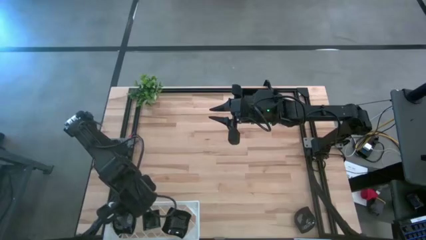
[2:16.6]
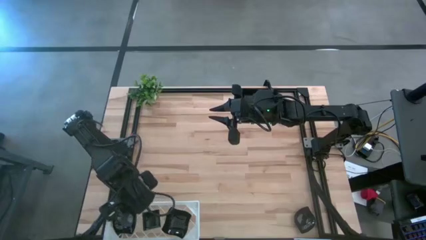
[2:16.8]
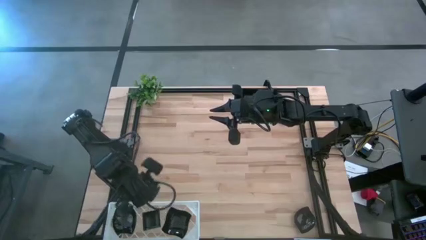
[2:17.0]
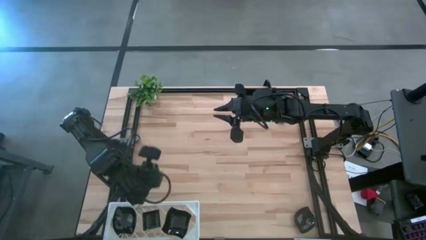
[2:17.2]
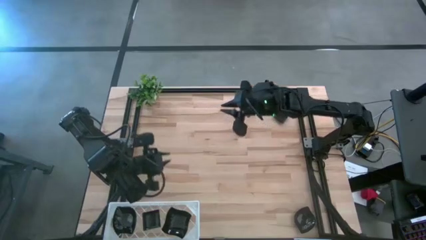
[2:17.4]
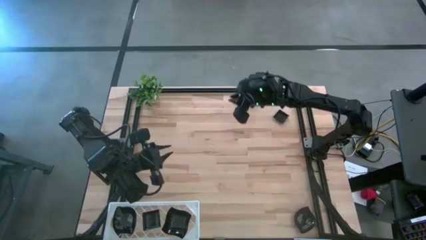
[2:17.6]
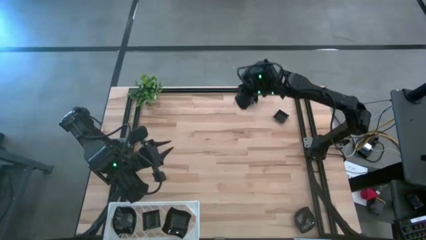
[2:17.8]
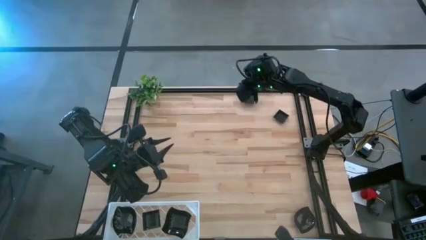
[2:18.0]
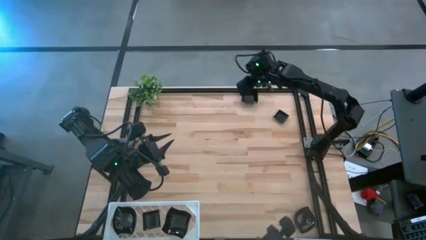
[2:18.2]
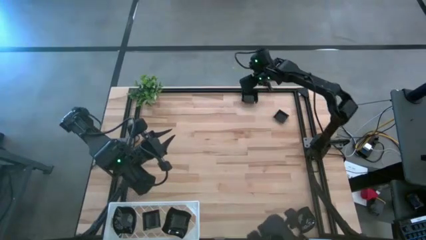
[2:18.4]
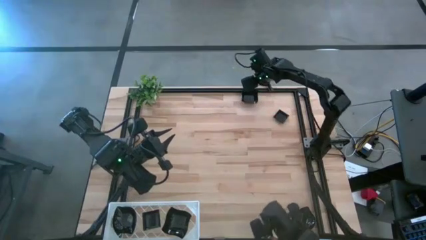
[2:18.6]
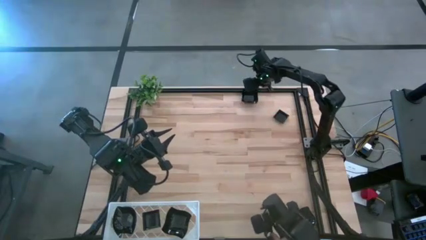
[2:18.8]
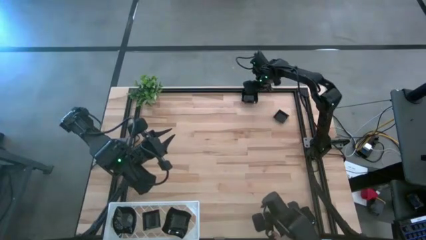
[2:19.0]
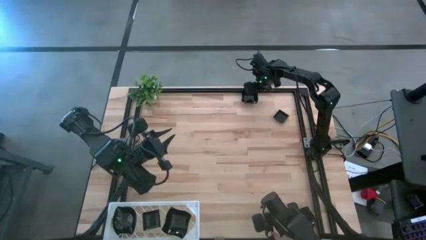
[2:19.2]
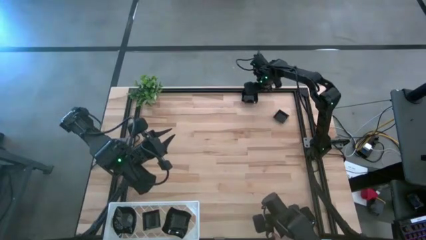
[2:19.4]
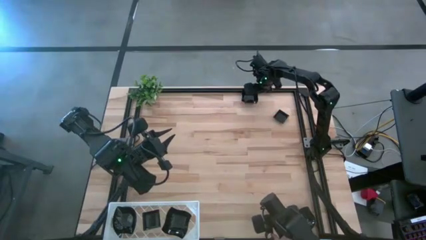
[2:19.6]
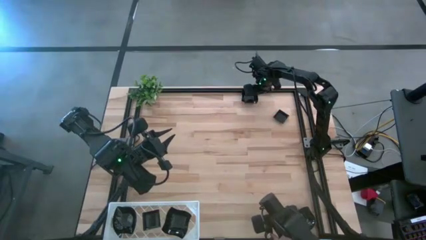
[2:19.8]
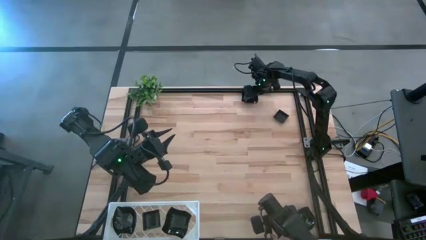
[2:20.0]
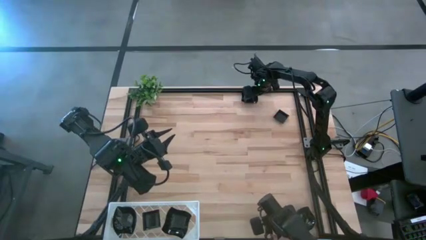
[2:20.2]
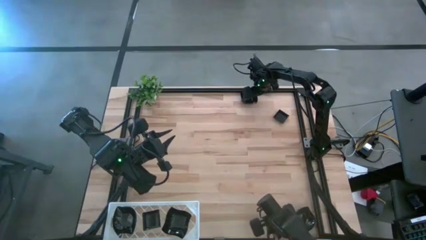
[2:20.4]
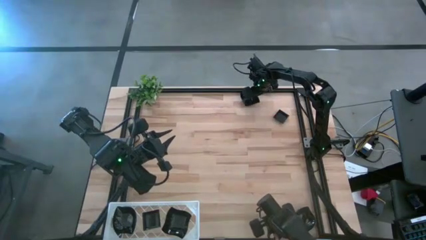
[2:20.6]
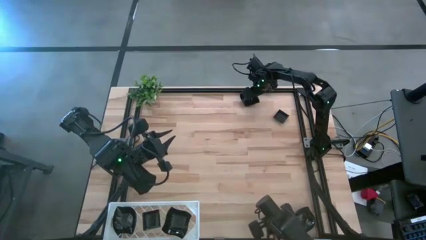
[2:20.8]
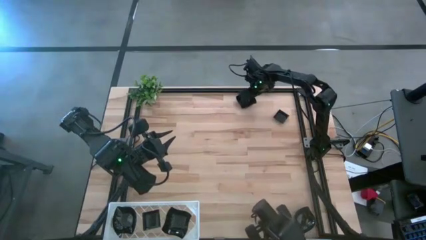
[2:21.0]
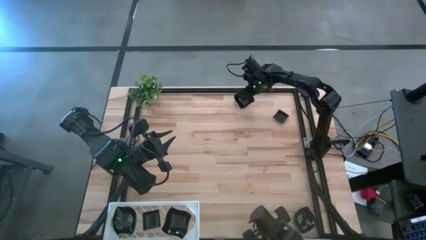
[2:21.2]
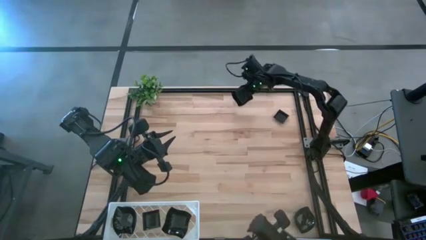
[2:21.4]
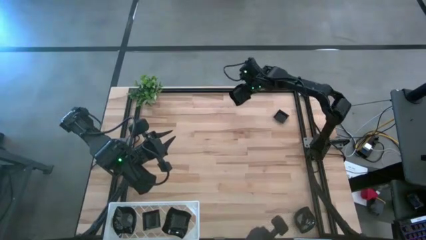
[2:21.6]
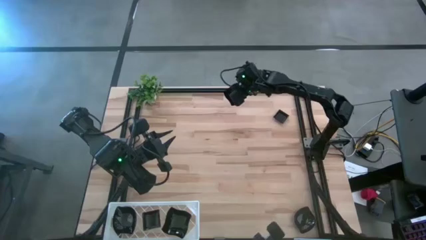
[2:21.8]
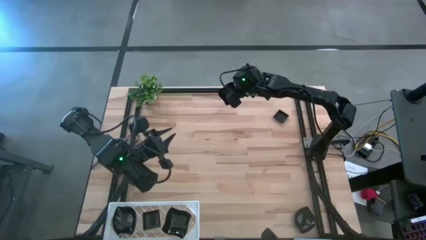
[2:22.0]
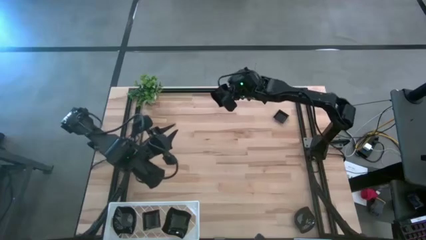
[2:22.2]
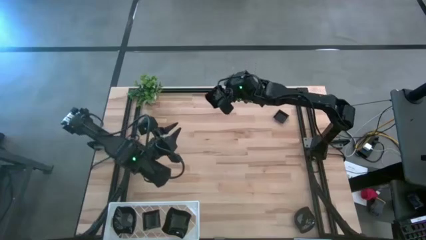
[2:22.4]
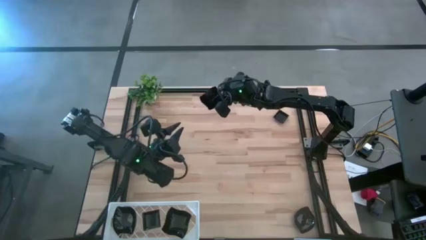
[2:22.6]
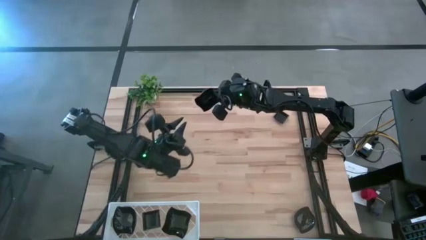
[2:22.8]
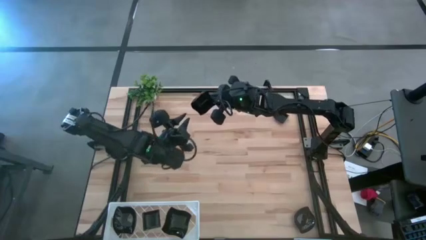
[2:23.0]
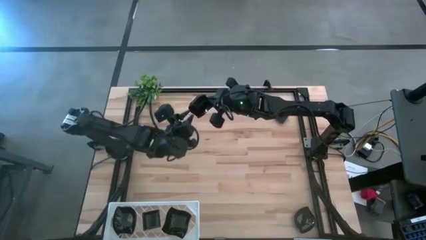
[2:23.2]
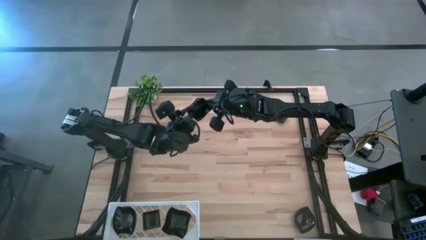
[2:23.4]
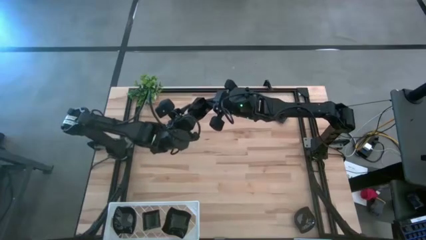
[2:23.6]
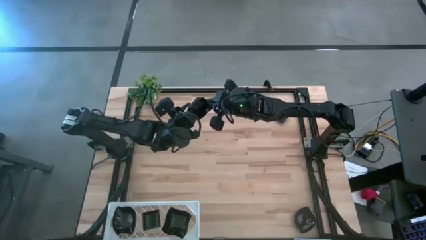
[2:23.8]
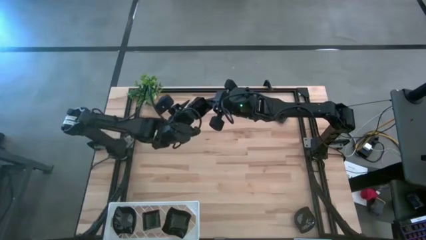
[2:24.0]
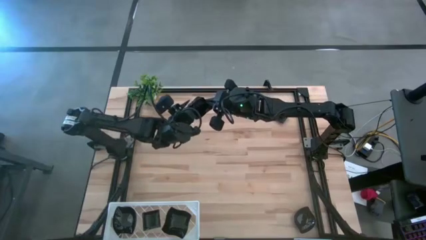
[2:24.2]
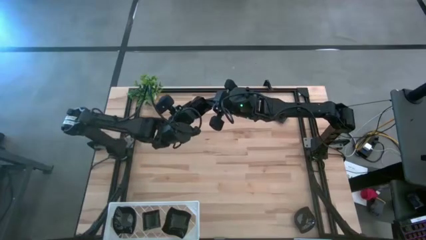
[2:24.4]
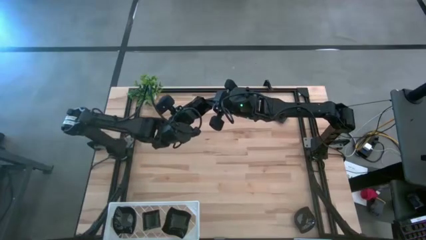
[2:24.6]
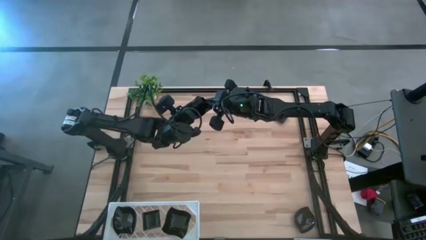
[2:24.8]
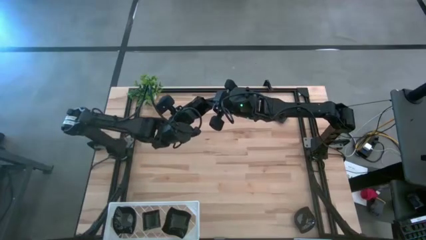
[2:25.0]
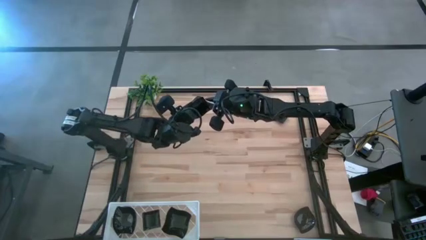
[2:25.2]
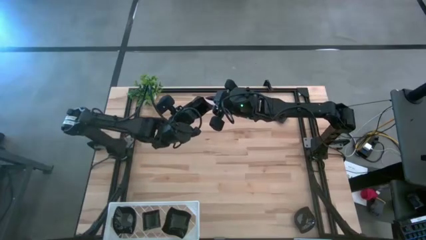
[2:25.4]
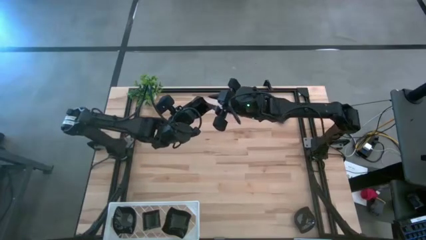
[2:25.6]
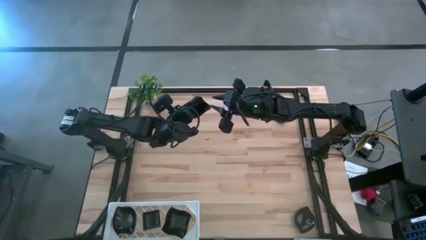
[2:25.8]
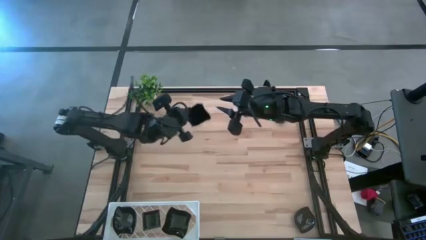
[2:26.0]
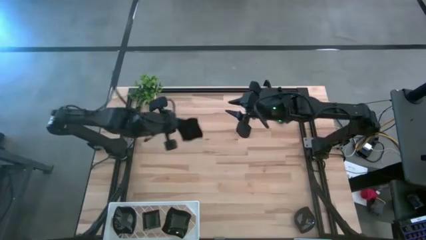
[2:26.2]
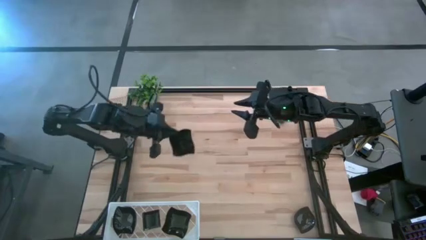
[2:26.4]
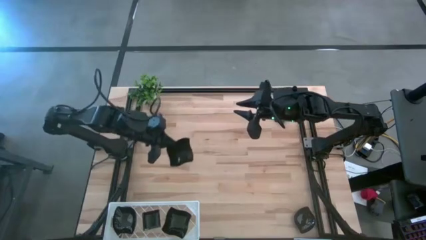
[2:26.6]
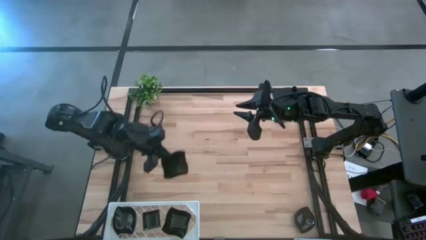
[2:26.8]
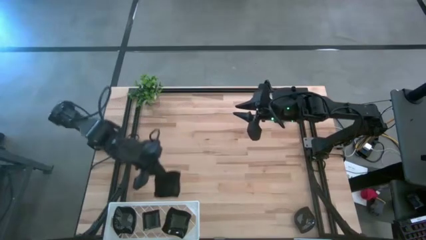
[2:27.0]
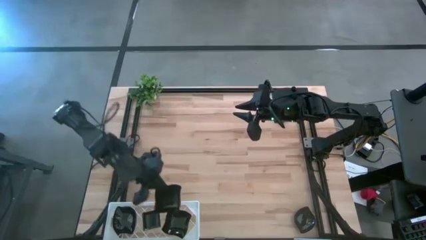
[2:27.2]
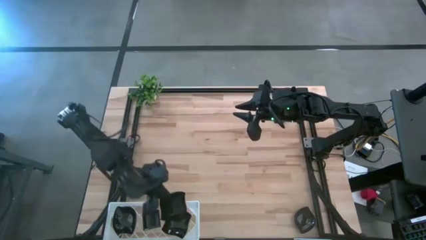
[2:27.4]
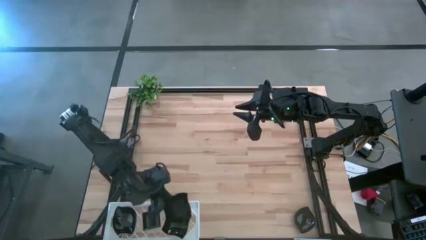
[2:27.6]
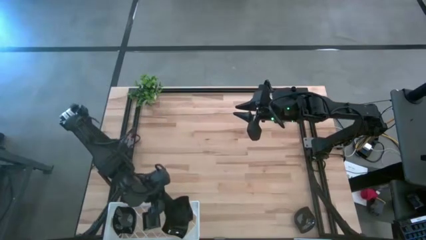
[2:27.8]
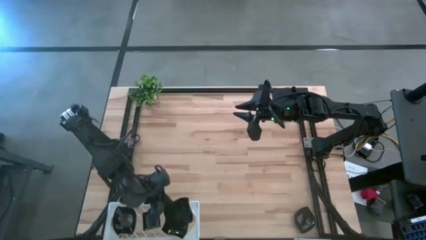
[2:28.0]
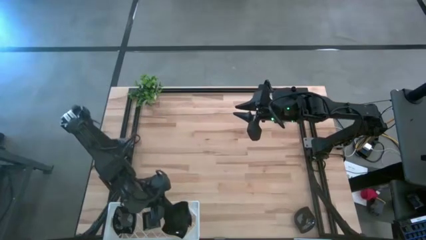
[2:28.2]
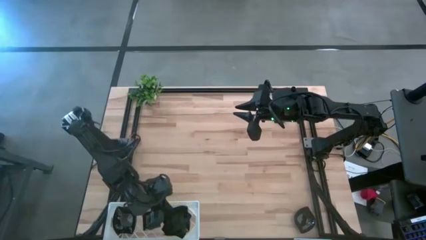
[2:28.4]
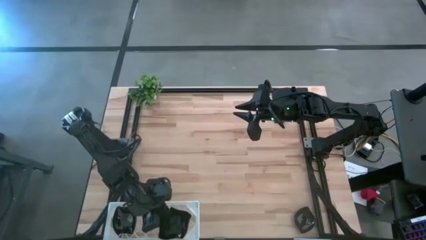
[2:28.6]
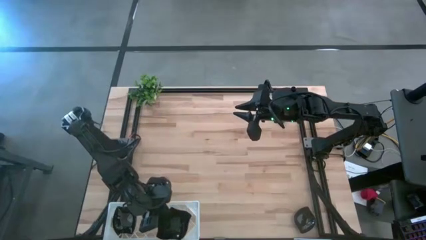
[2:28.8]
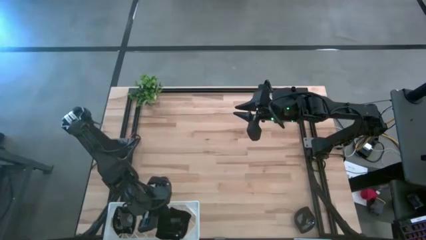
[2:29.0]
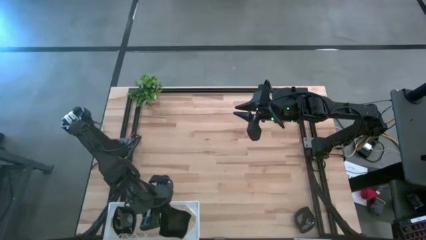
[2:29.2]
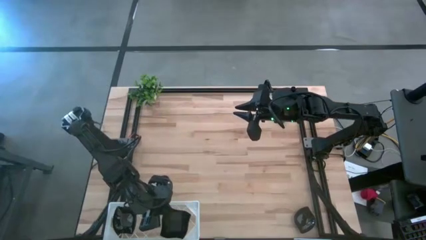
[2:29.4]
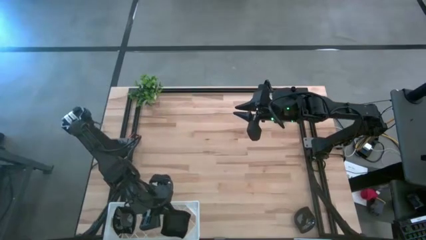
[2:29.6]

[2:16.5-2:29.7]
Task: Pick & Place Mini shaped plates
Stack the black distorted square plate on top of the other black distorted square plates on the shelf
